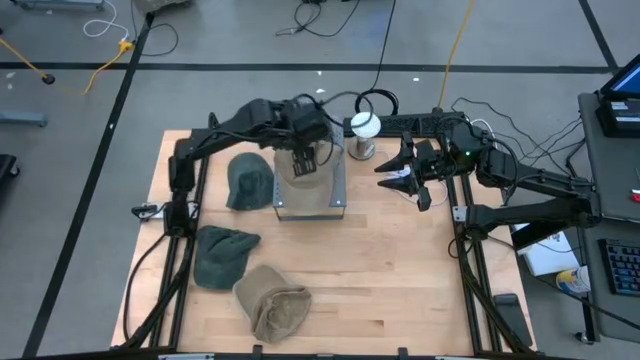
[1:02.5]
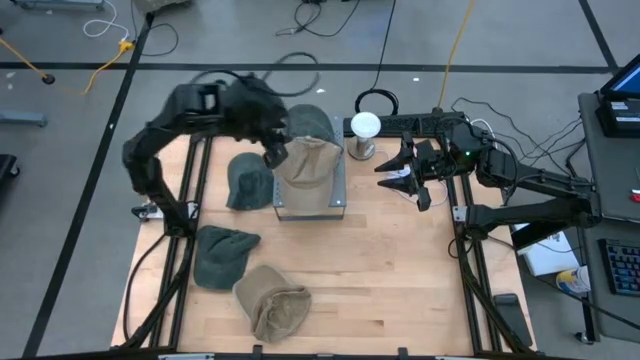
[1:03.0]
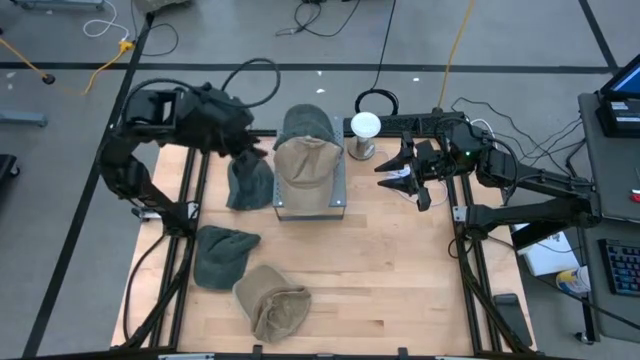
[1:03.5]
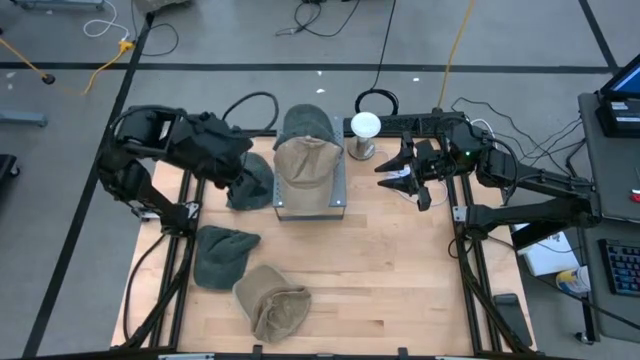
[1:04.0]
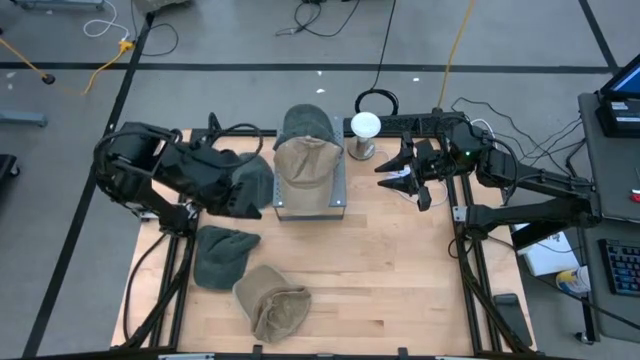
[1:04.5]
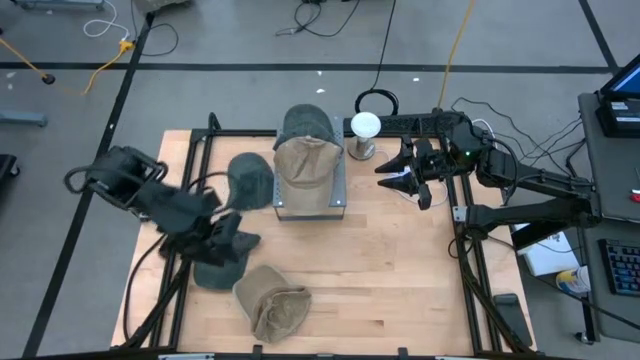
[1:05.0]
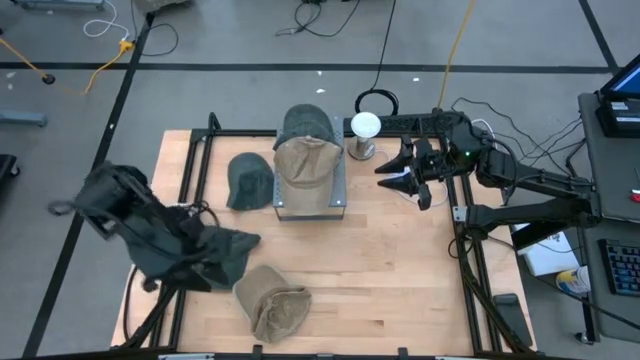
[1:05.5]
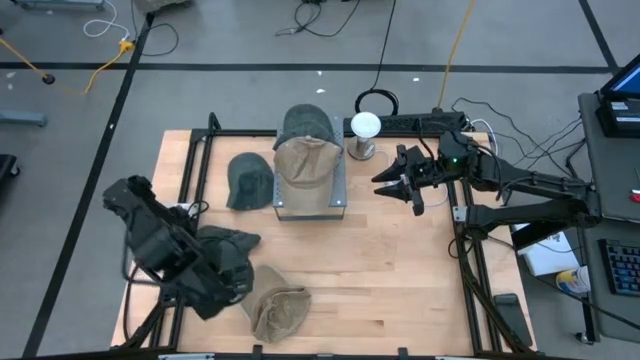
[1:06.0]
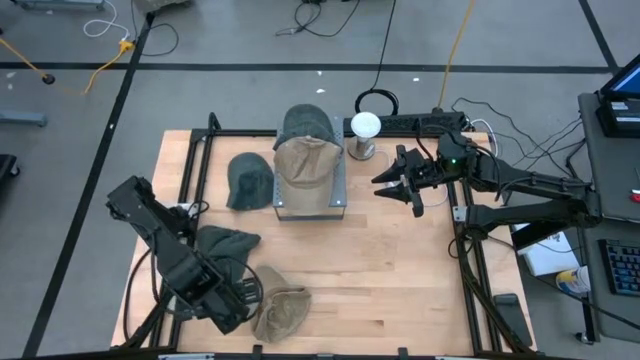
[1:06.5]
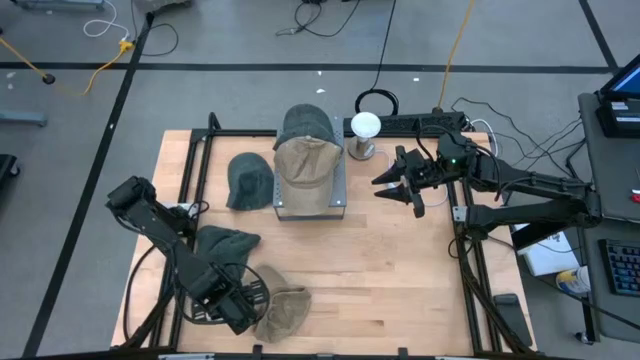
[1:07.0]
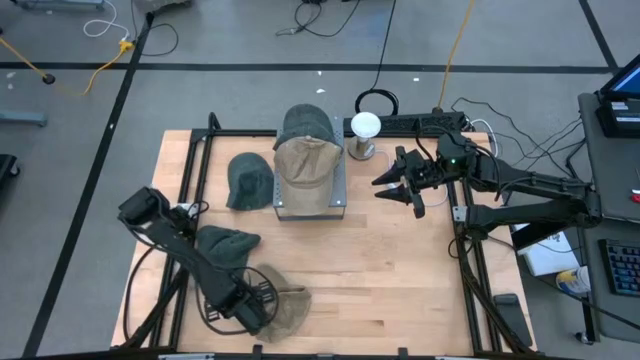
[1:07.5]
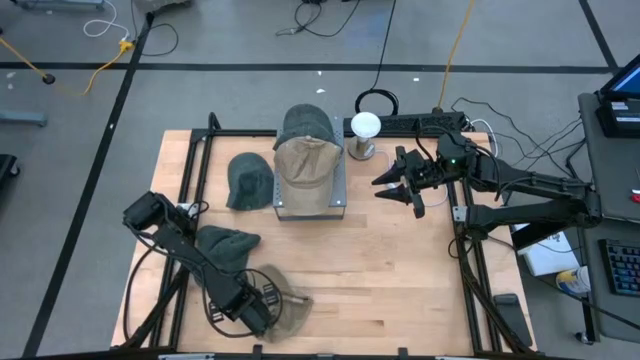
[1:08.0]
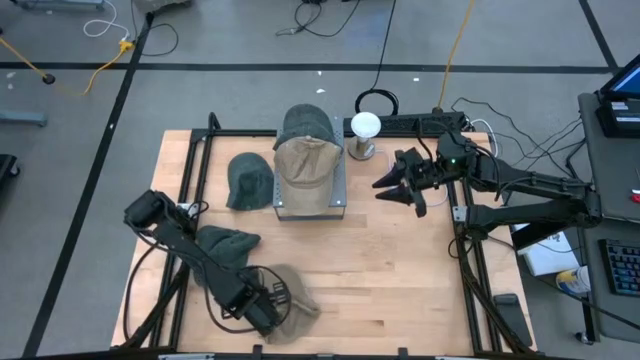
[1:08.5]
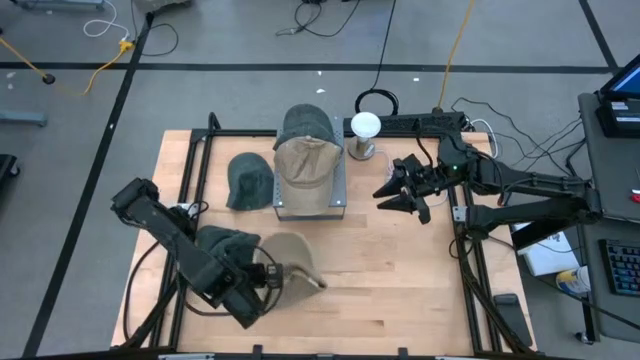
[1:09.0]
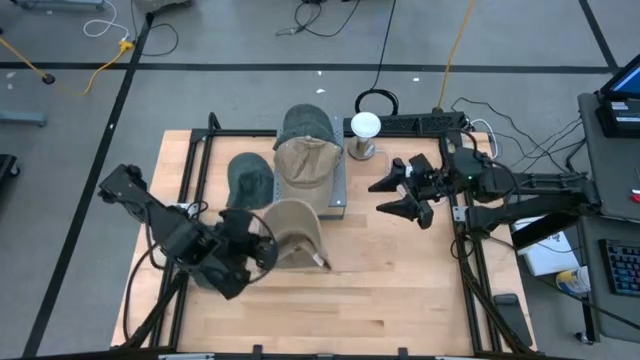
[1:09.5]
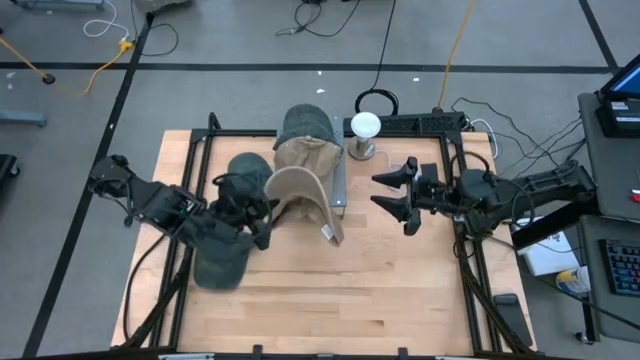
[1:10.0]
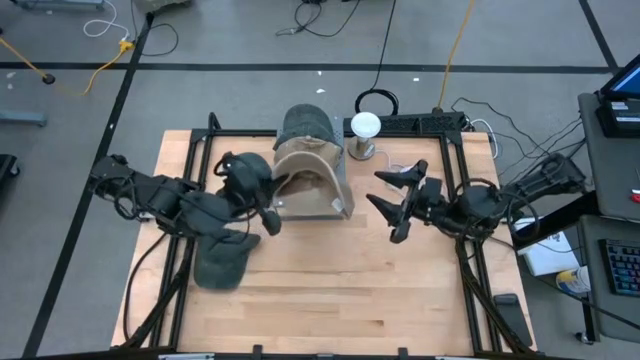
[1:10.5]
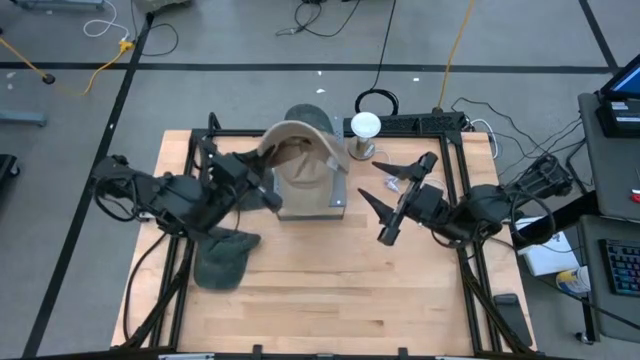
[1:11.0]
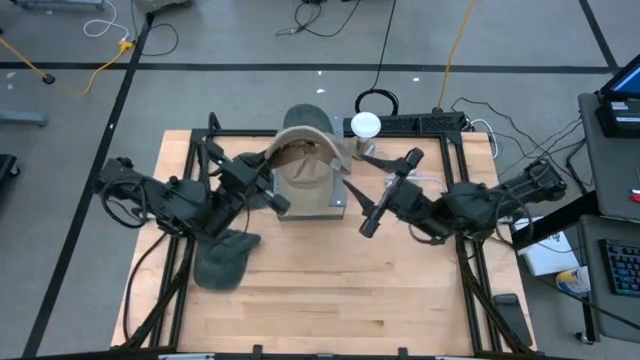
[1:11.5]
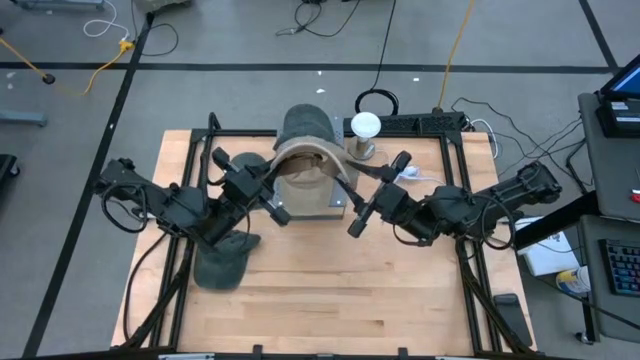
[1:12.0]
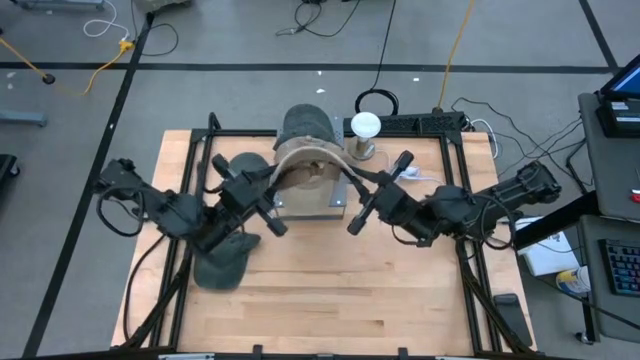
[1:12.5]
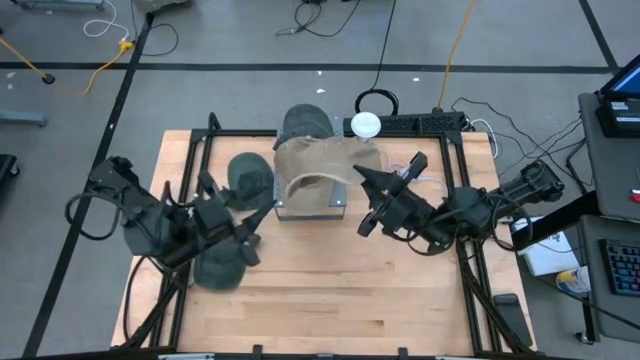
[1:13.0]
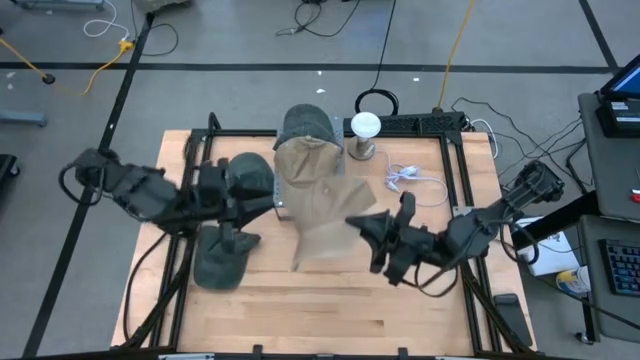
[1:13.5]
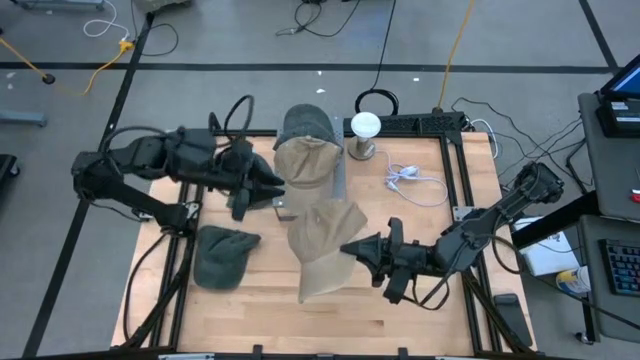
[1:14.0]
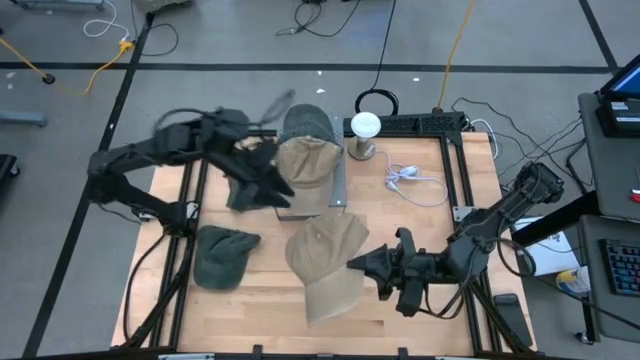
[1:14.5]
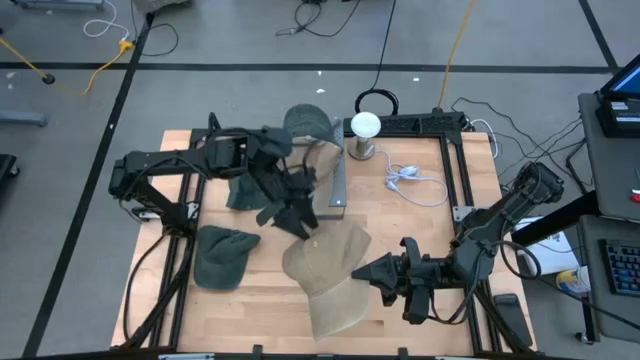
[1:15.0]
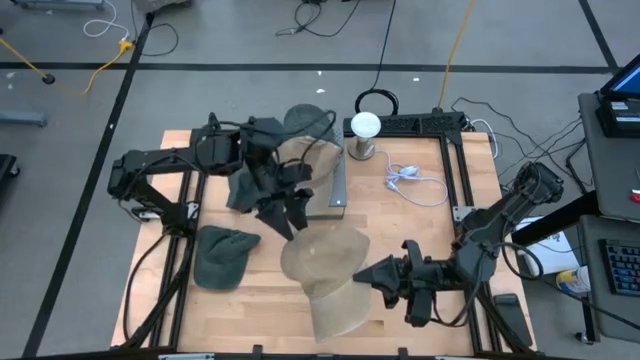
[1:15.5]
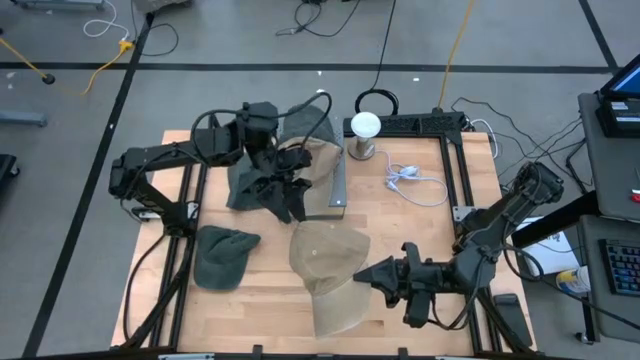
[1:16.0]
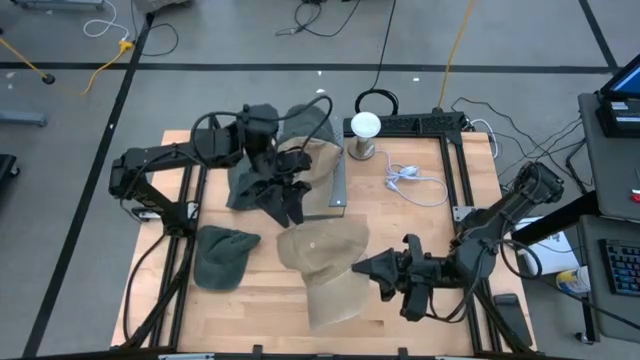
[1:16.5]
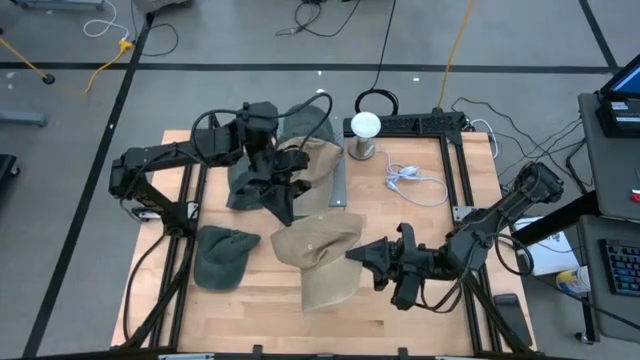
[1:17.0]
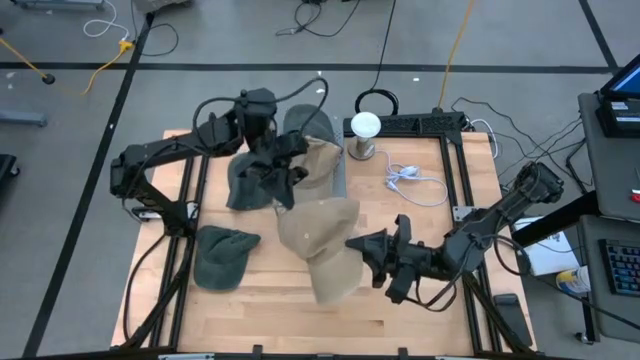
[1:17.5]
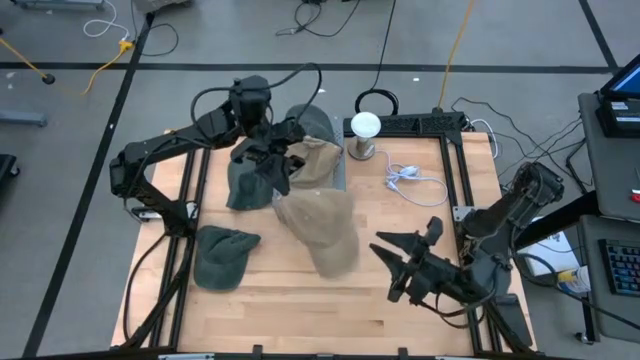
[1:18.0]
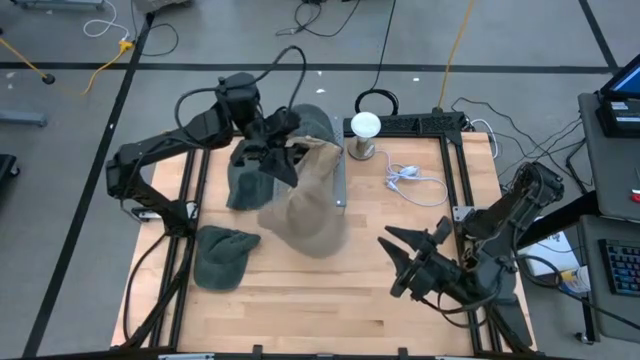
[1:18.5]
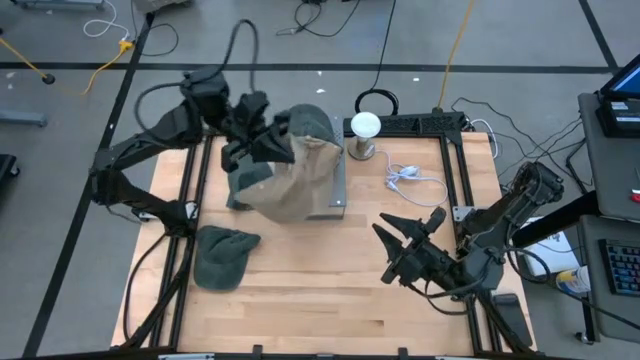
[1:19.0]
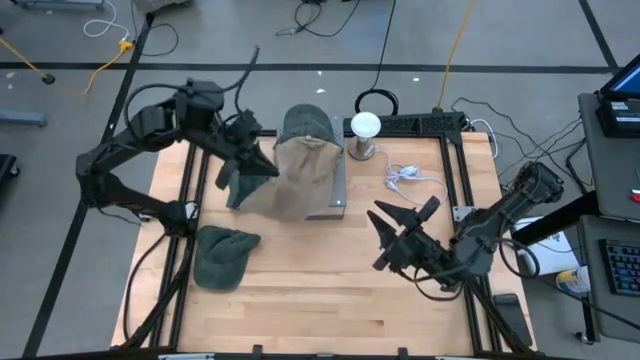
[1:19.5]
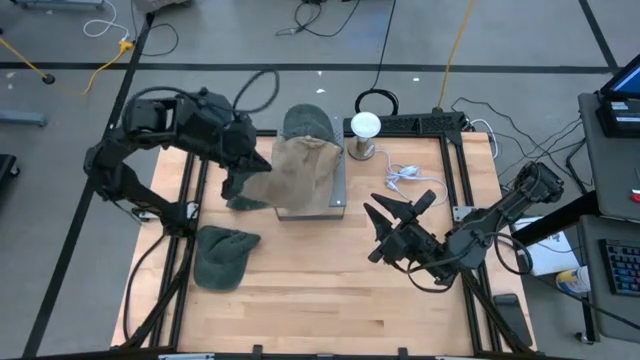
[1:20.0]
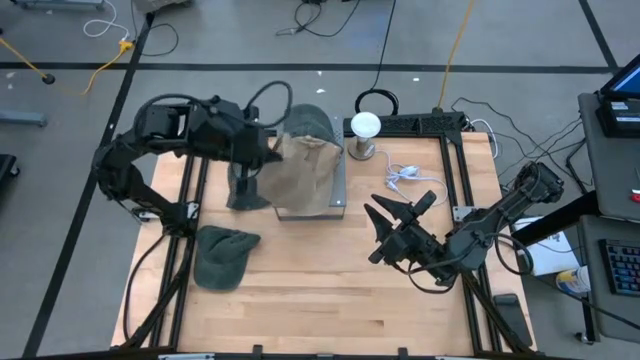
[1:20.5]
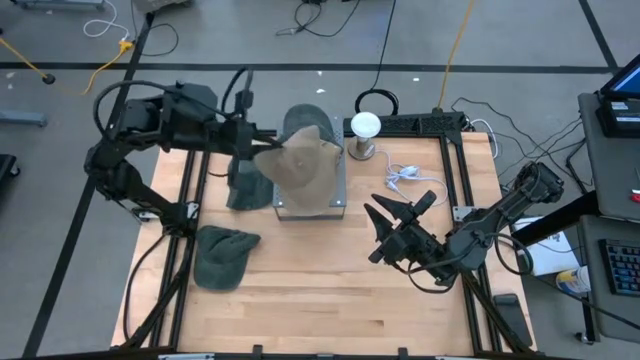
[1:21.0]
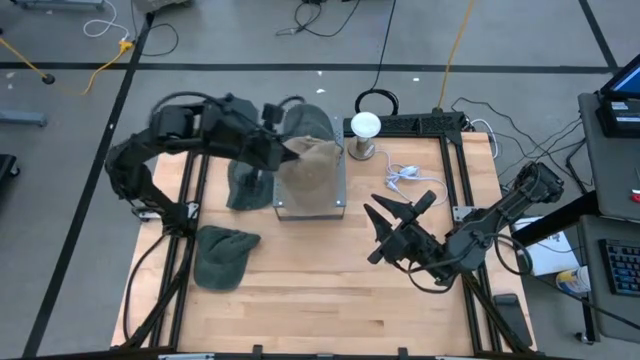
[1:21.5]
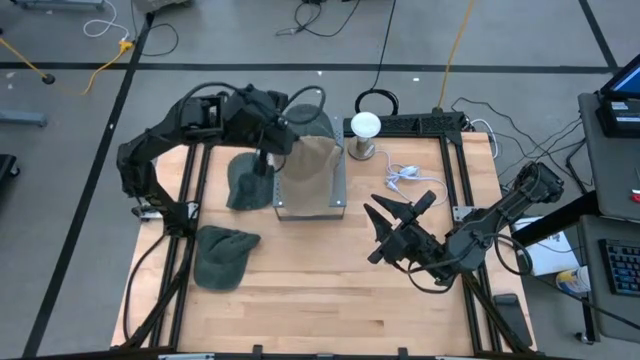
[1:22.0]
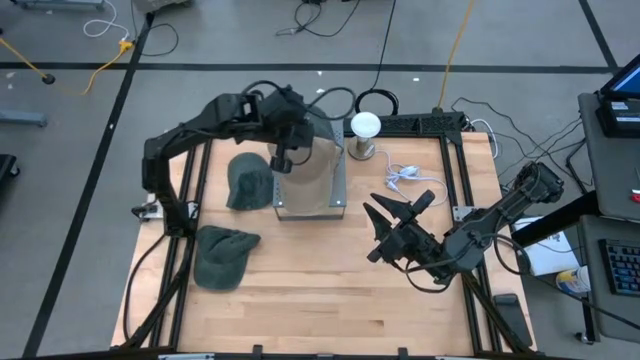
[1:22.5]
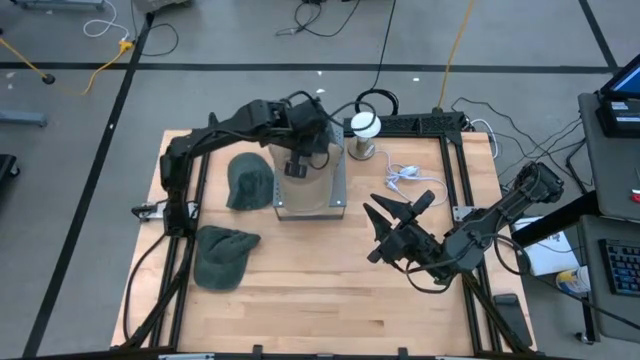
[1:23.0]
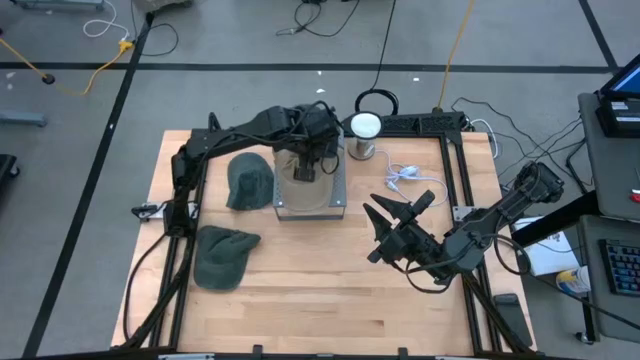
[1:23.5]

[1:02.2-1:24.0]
Task: Pick & Place hat
Stack the brown cap on the stacked brown caps on the shelf

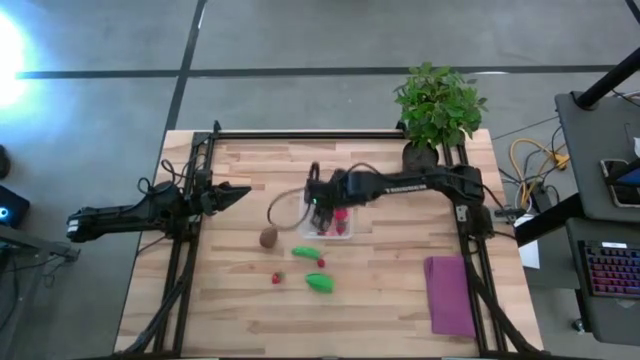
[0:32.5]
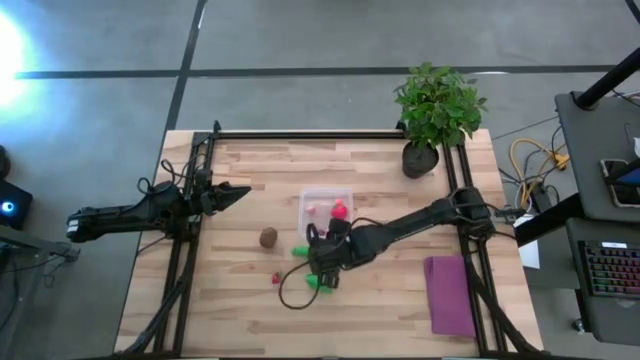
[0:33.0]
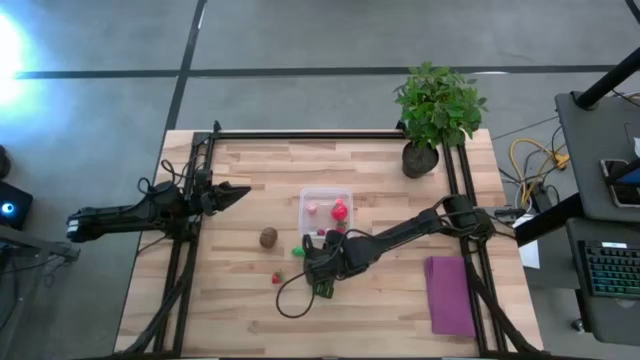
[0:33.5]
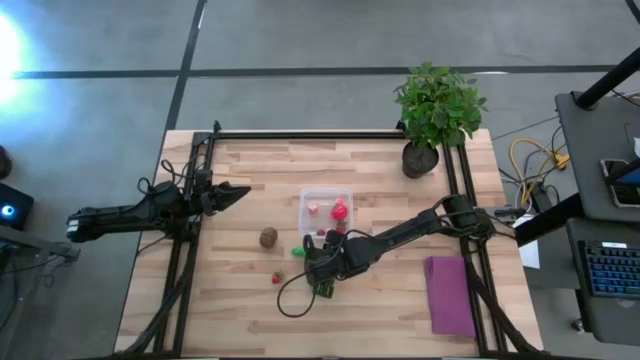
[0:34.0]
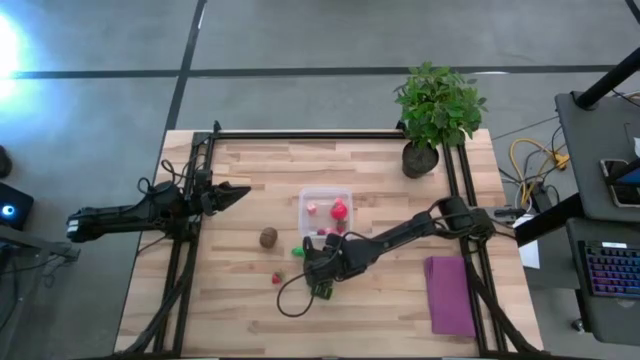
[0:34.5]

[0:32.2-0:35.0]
Task: Pick and placing Produce into tupperware
Put the red cherry into the transparent bin
